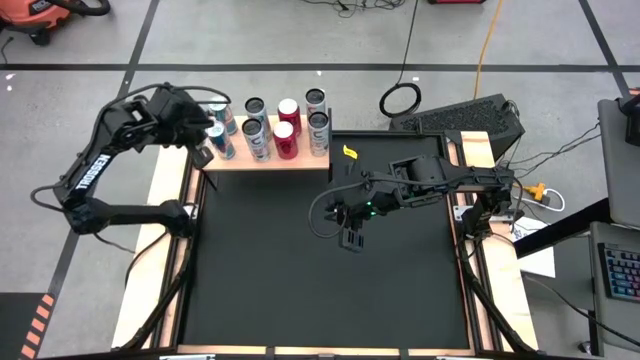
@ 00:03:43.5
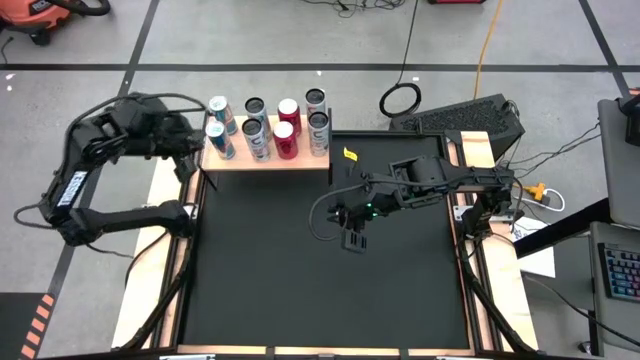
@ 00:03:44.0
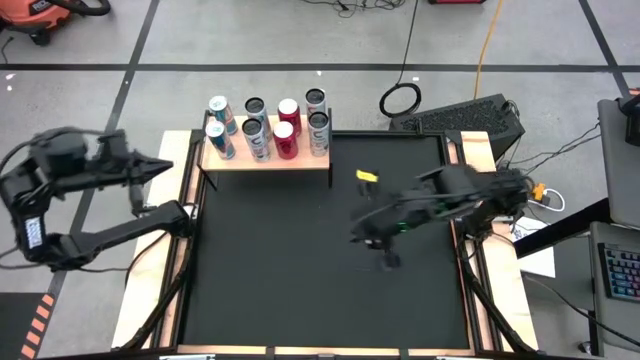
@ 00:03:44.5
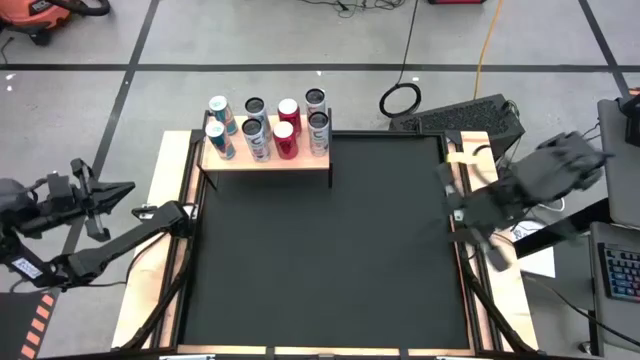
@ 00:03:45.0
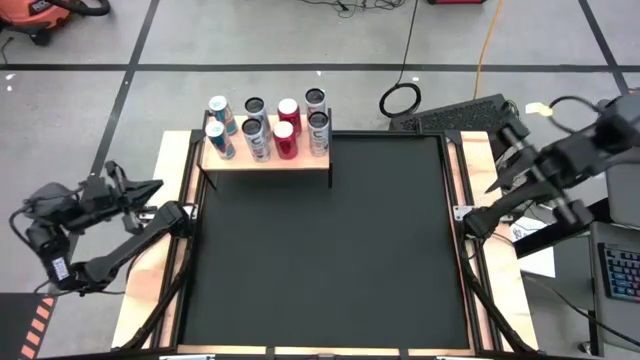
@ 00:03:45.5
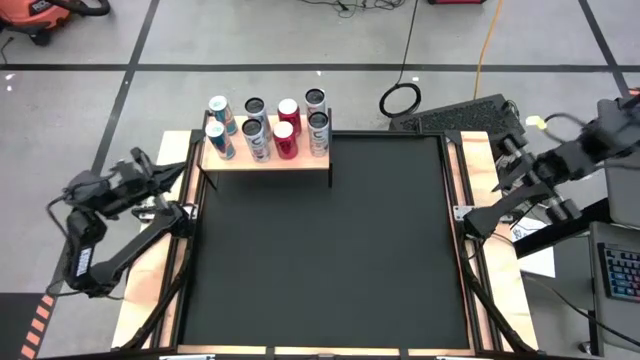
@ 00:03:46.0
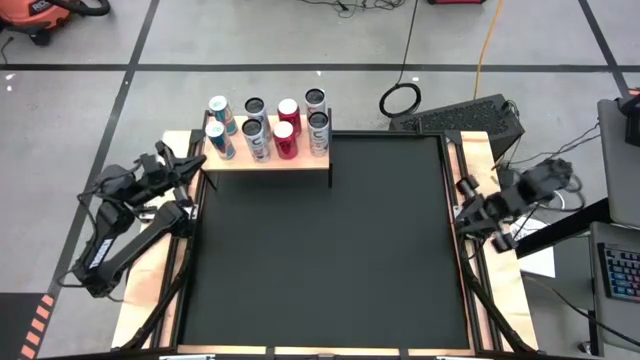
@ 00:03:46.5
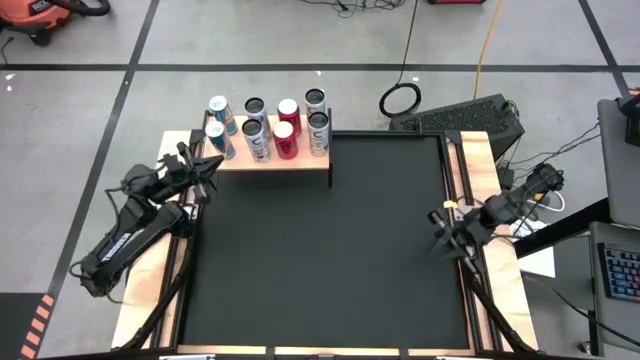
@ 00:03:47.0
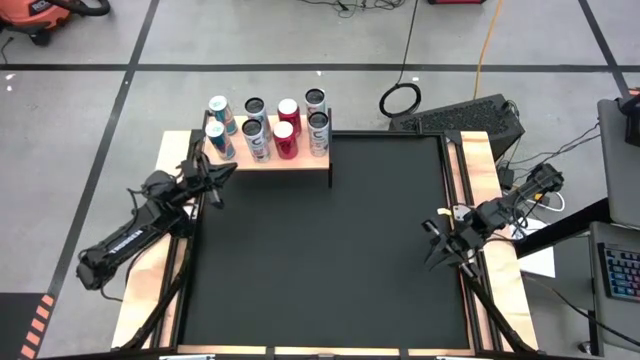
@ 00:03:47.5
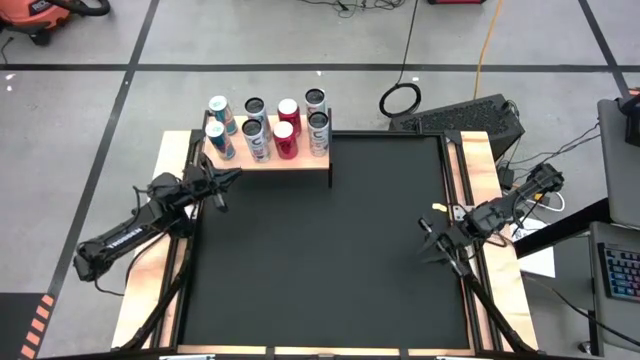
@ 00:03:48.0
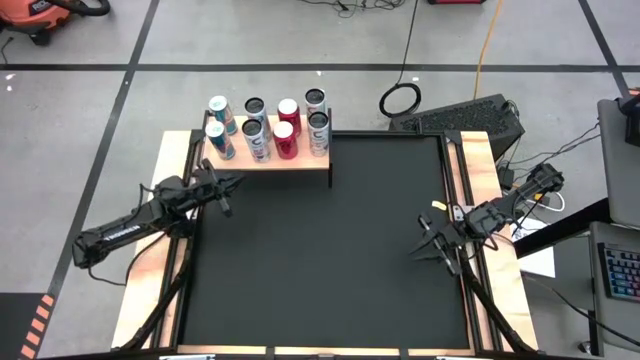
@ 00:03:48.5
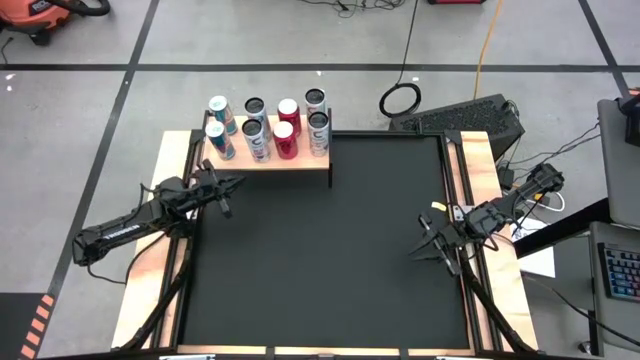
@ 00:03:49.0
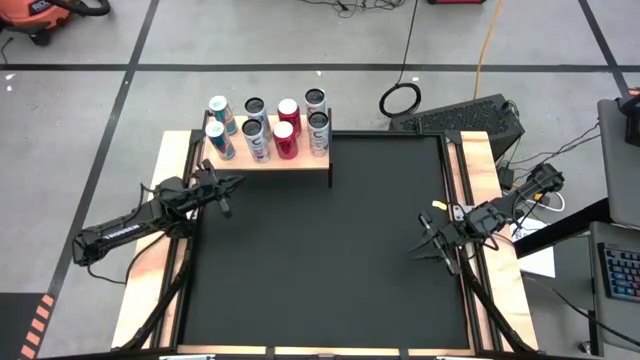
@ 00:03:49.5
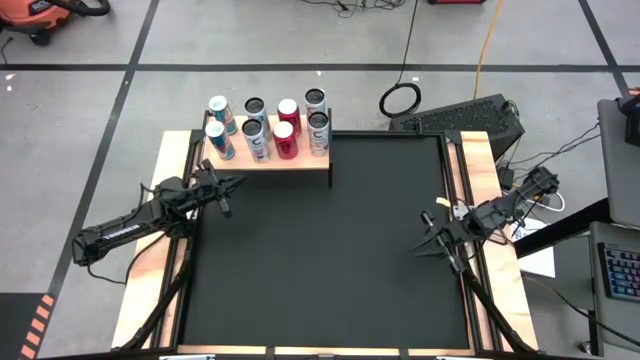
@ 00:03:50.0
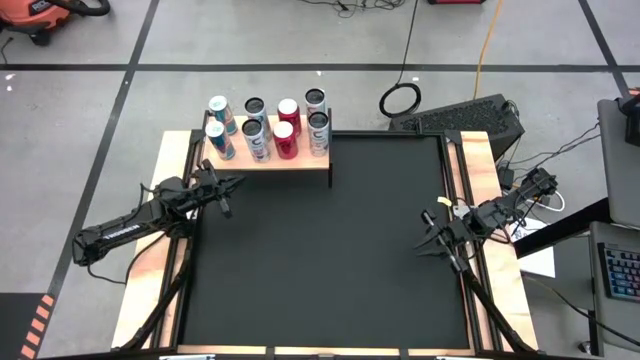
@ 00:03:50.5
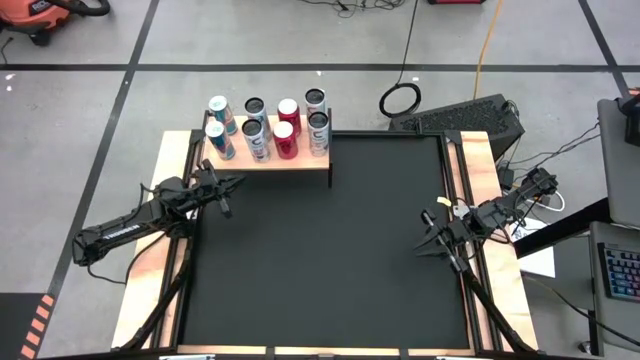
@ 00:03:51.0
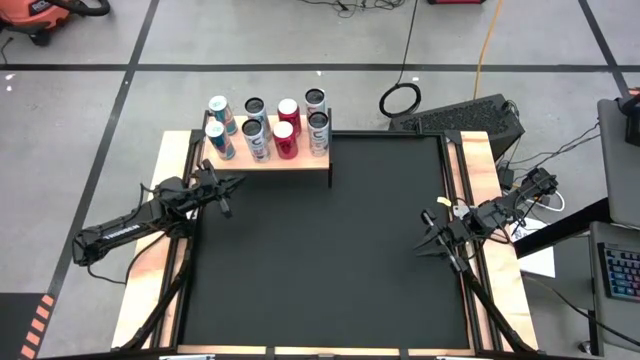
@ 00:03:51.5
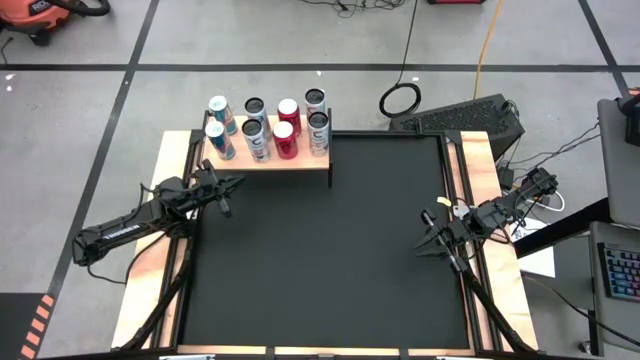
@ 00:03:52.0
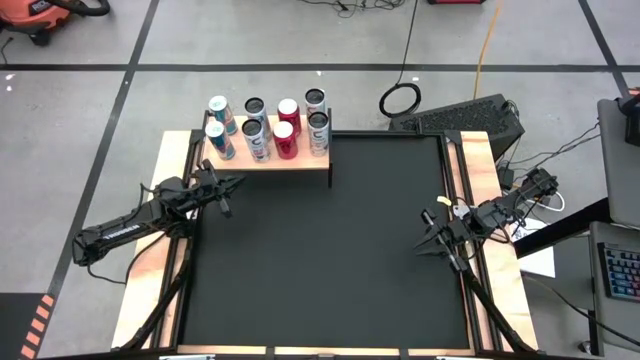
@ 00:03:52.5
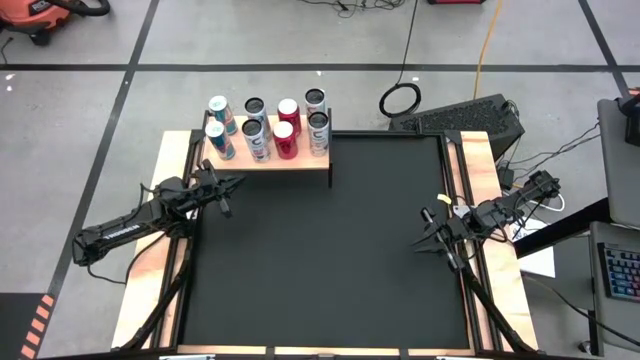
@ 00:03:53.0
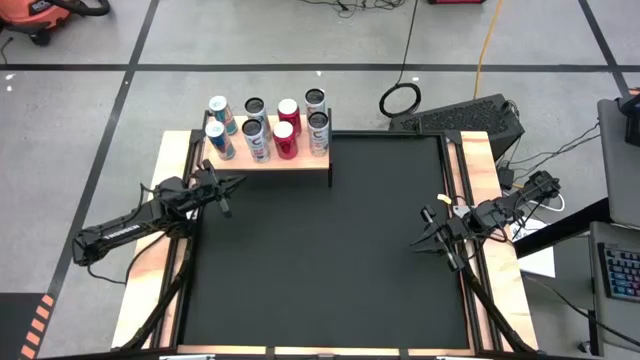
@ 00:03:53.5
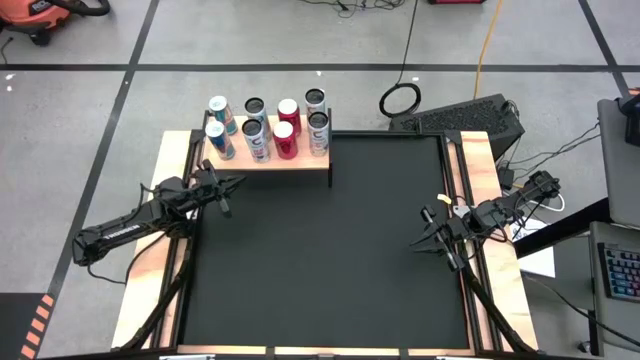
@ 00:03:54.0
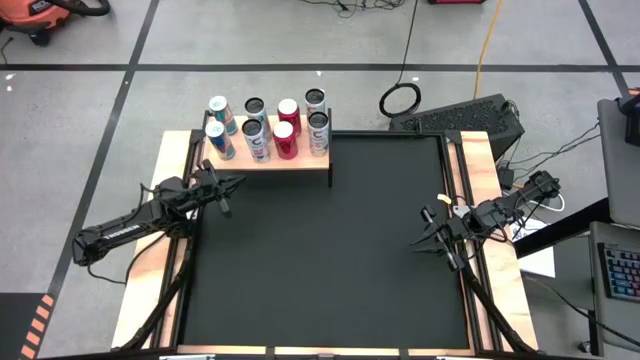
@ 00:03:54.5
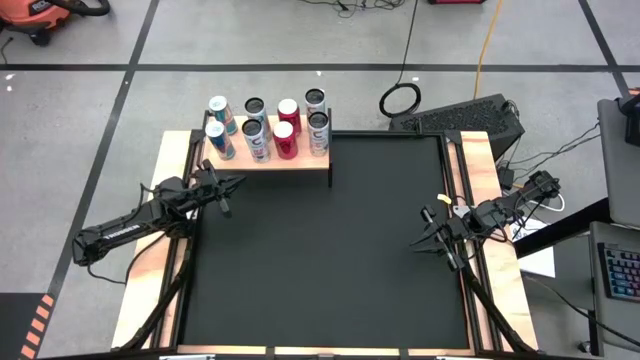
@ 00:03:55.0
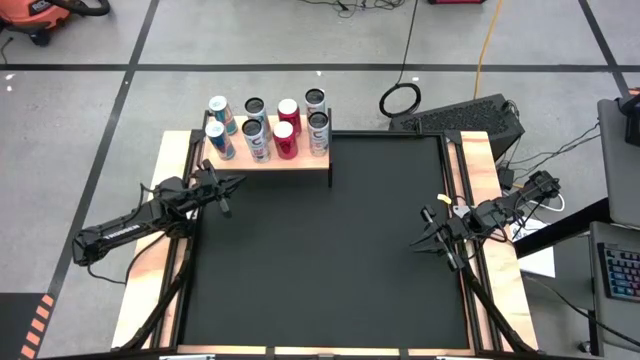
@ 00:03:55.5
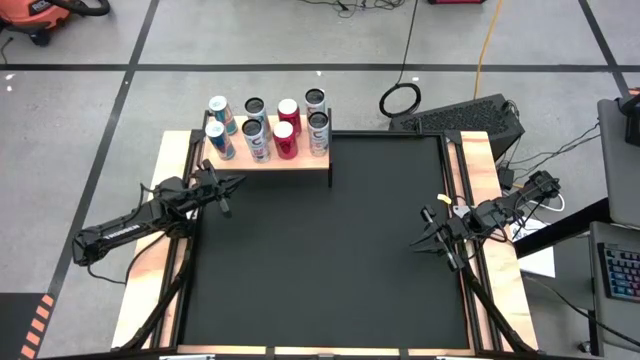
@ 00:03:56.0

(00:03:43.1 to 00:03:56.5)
Task: Place canned beverage on shelf
Return to Home Position

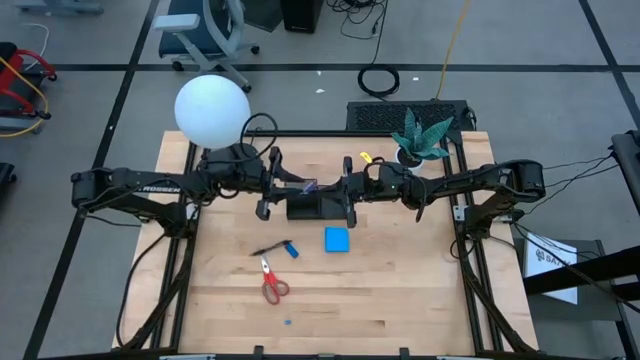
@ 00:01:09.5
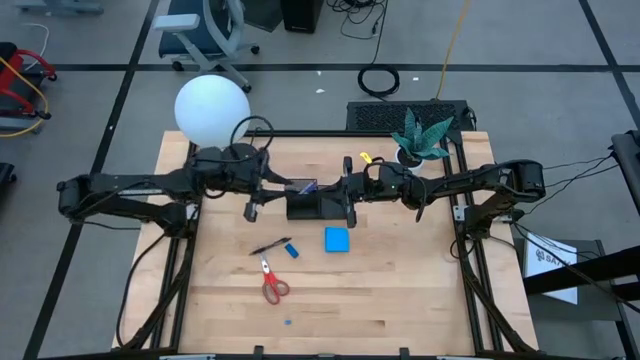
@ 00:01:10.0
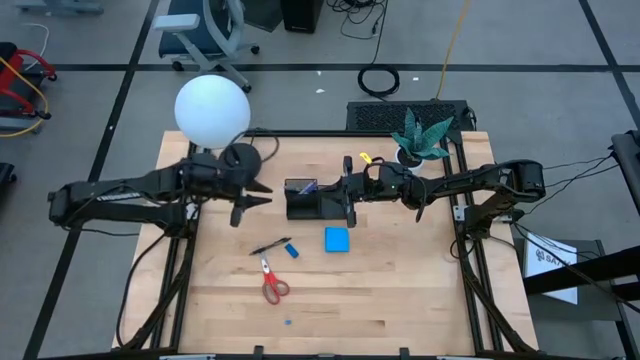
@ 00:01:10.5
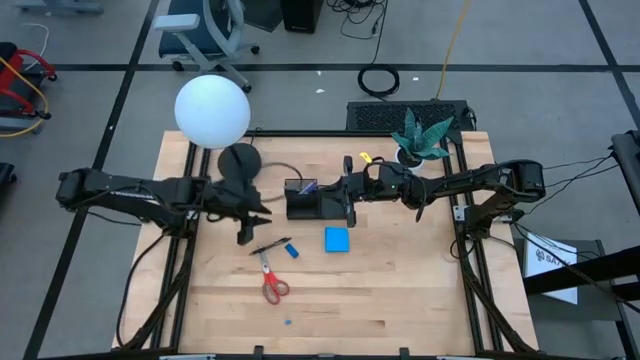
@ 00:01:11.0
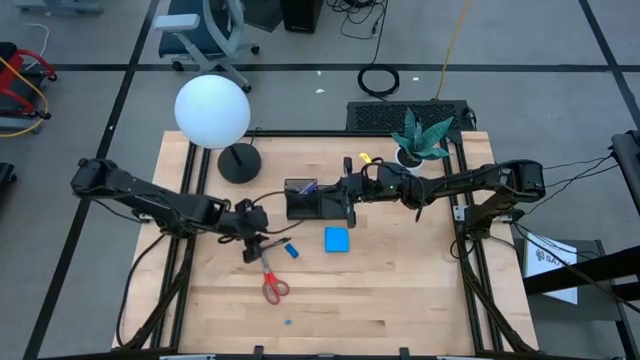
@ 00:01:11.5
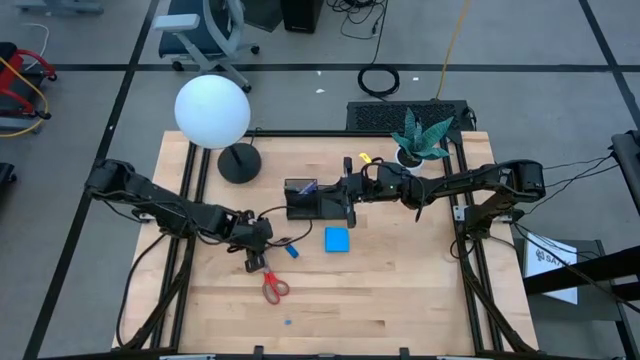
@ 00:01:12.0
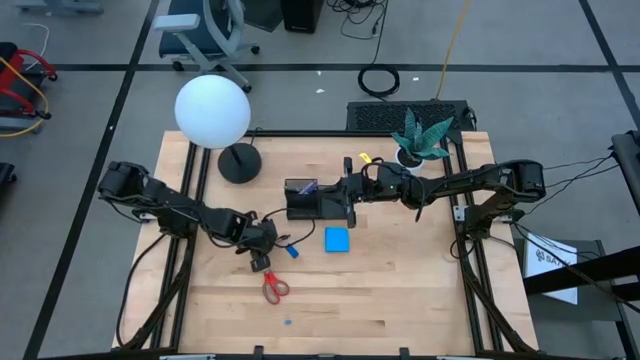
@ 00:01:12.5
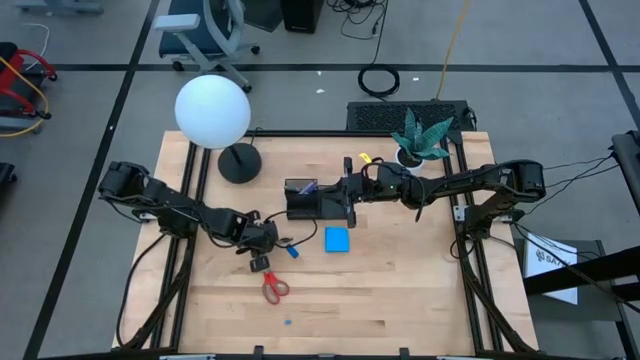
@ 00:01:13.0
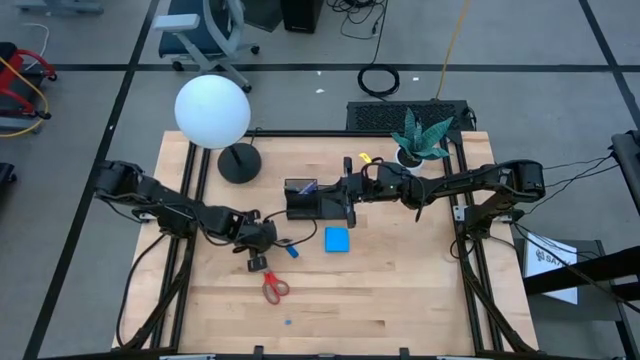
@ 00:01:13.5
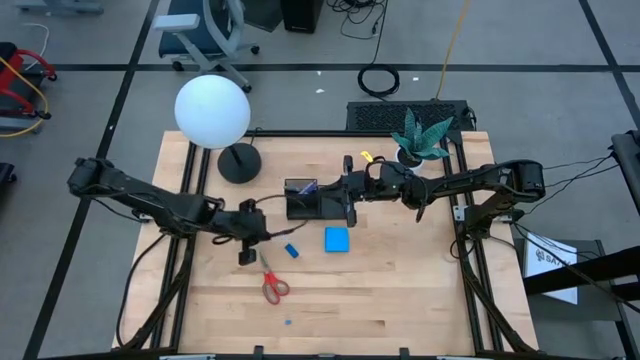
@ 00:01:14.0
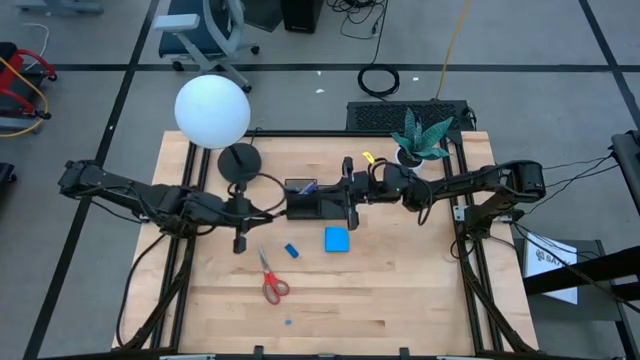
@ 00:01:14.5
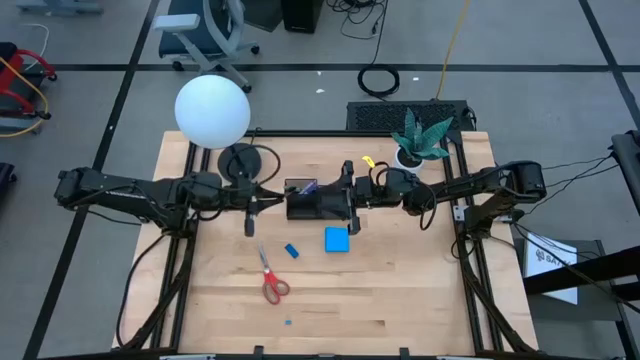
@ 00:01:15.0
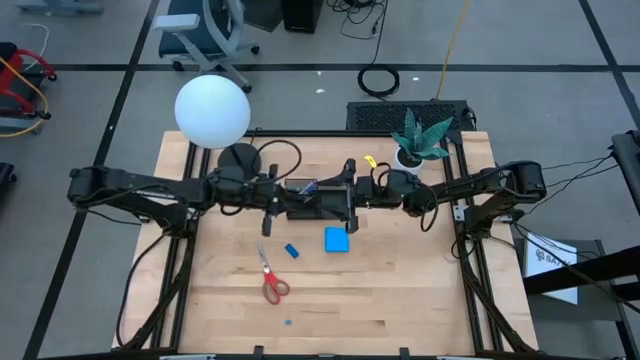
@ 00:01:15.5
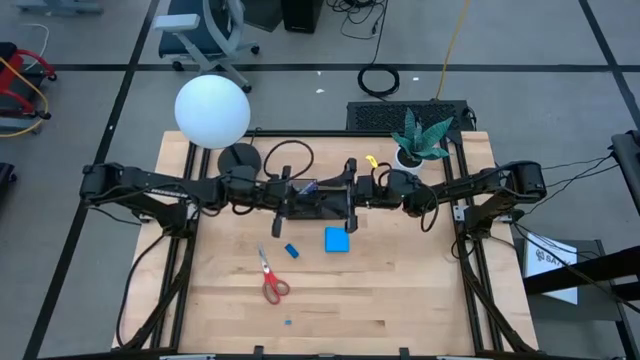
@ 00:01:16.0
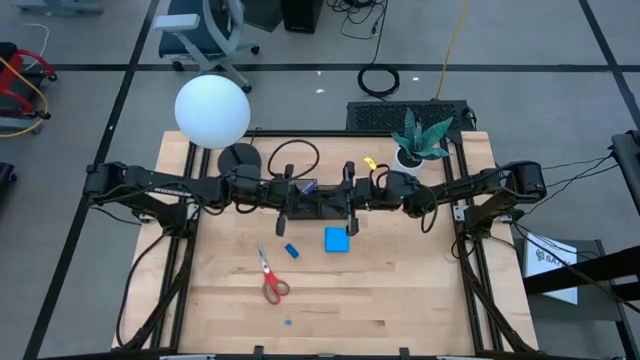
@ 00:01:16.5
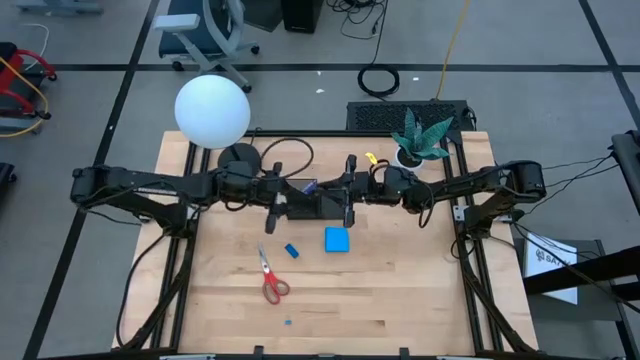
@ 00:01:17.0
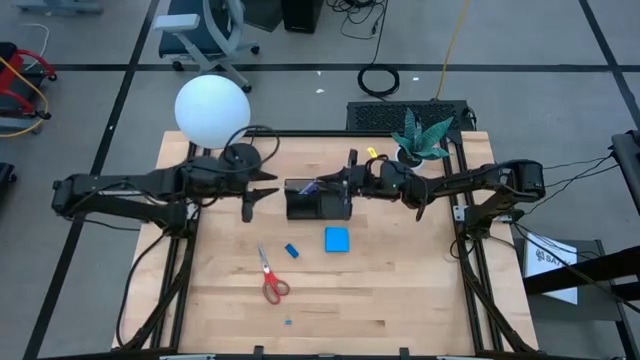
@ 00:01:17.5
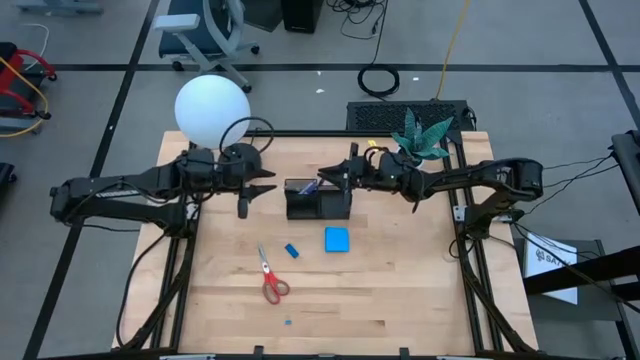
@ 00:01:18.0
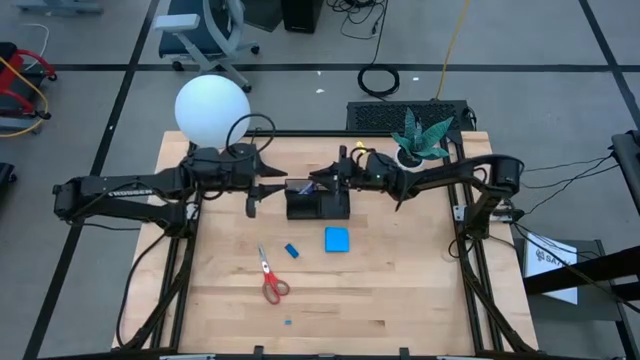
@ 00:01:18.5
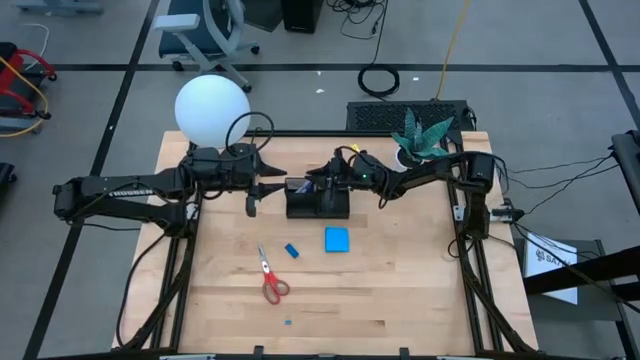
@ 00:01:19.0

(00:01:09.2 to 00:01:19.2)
Task: Pick and place office supplies into organizer
Put the black pen into the black mesh organizer
